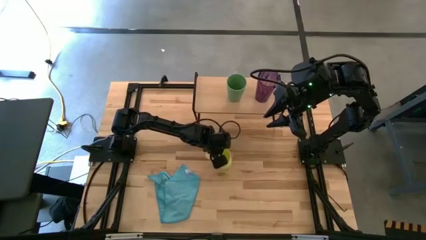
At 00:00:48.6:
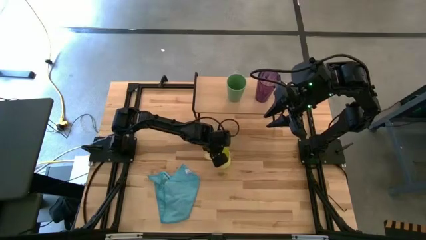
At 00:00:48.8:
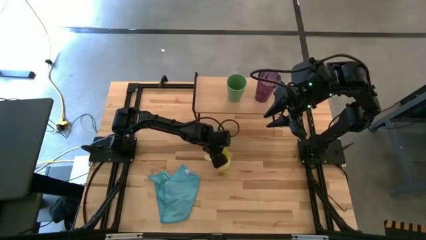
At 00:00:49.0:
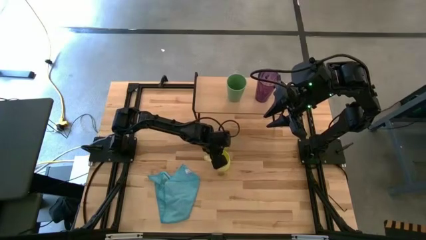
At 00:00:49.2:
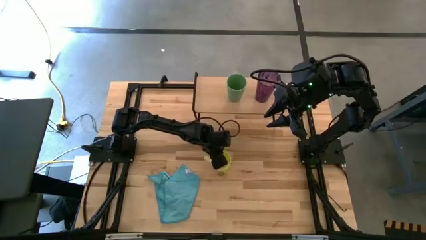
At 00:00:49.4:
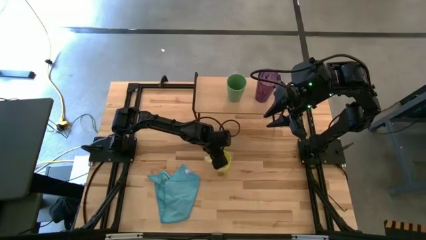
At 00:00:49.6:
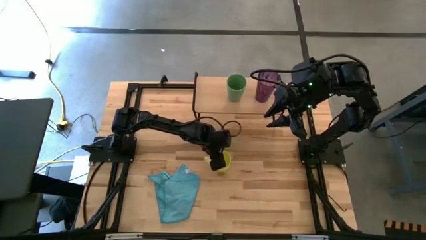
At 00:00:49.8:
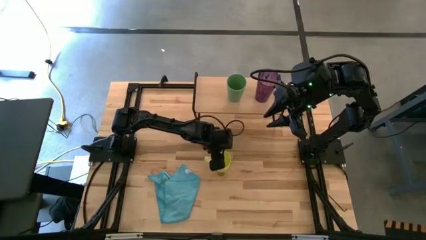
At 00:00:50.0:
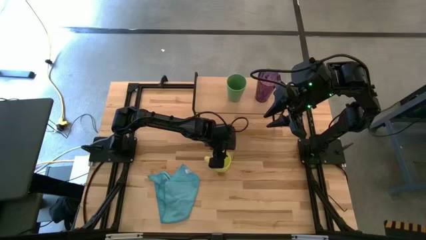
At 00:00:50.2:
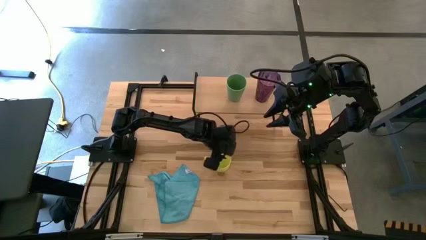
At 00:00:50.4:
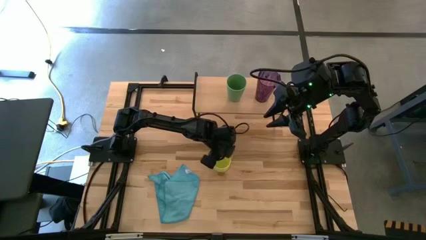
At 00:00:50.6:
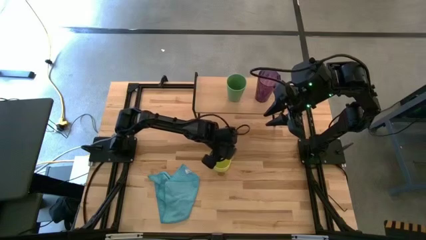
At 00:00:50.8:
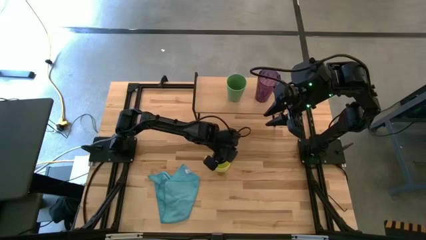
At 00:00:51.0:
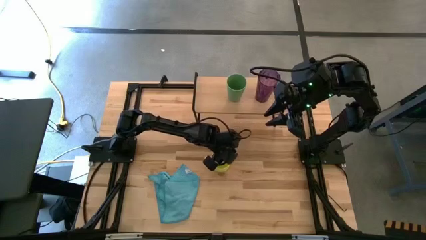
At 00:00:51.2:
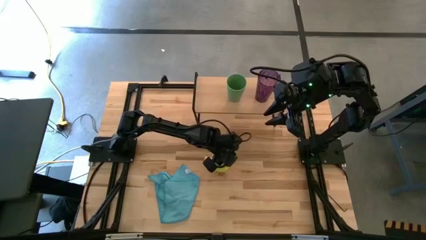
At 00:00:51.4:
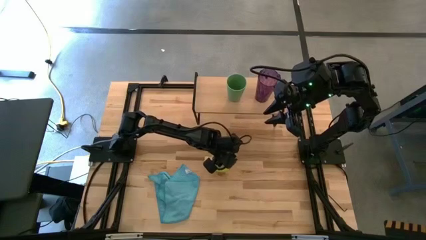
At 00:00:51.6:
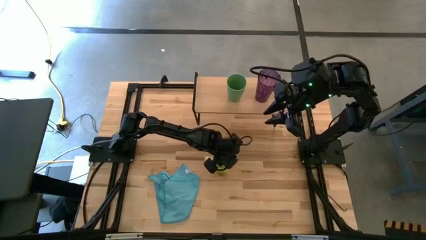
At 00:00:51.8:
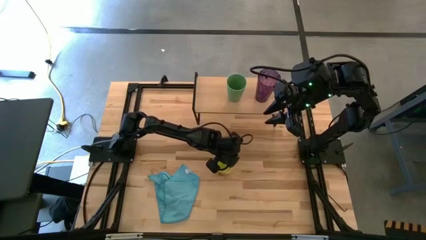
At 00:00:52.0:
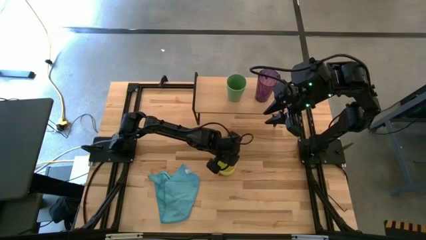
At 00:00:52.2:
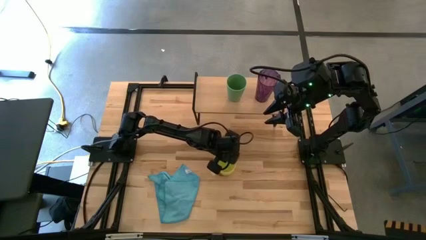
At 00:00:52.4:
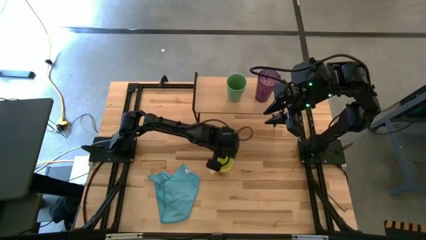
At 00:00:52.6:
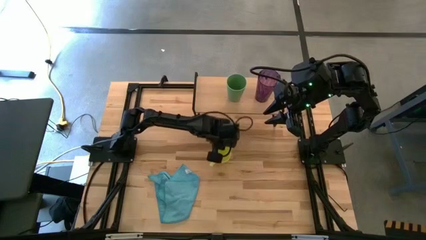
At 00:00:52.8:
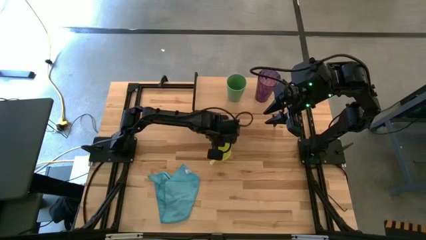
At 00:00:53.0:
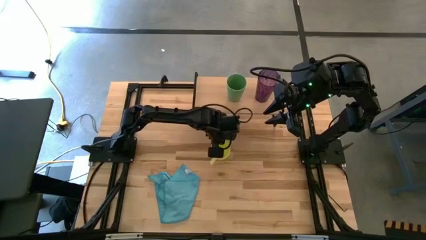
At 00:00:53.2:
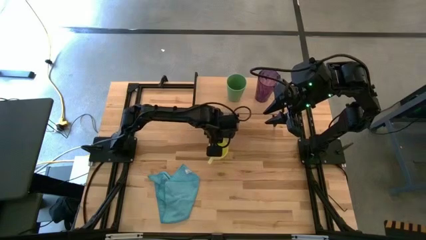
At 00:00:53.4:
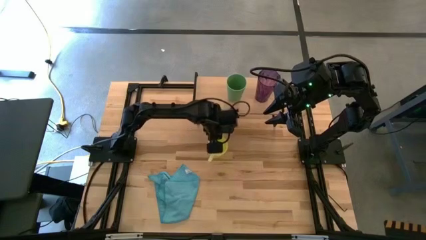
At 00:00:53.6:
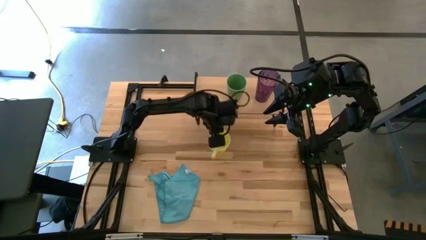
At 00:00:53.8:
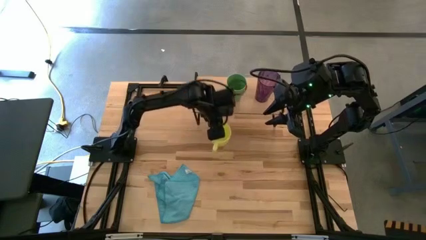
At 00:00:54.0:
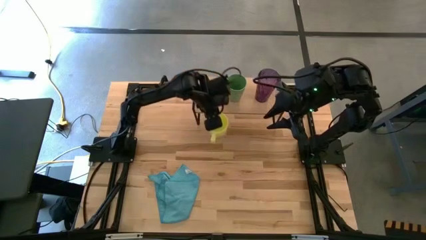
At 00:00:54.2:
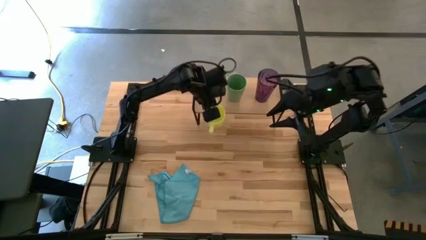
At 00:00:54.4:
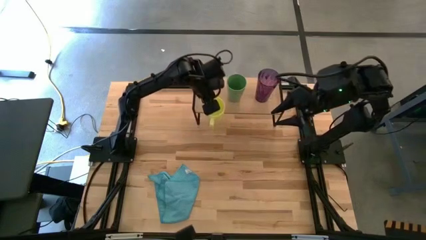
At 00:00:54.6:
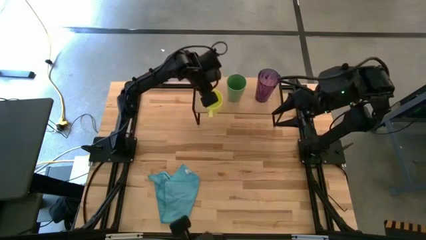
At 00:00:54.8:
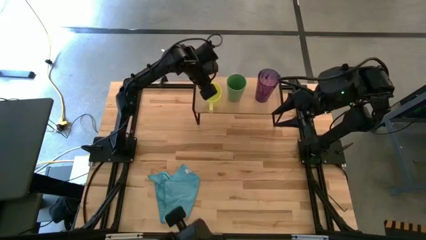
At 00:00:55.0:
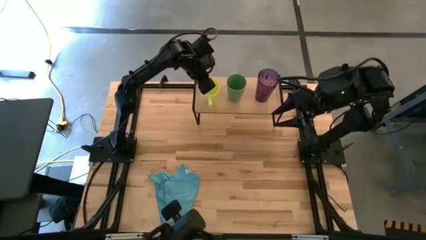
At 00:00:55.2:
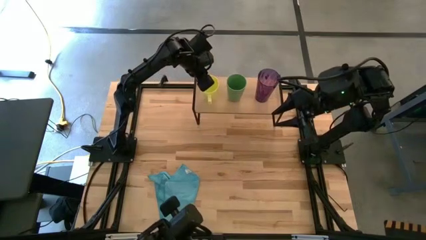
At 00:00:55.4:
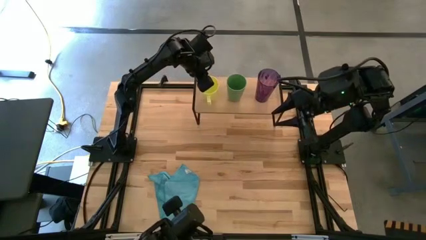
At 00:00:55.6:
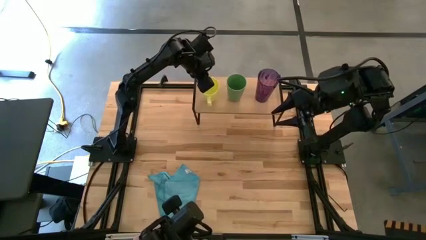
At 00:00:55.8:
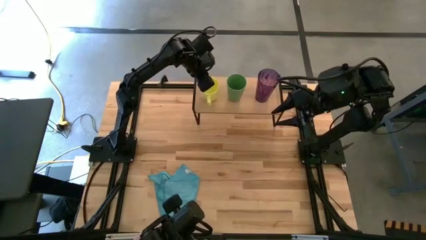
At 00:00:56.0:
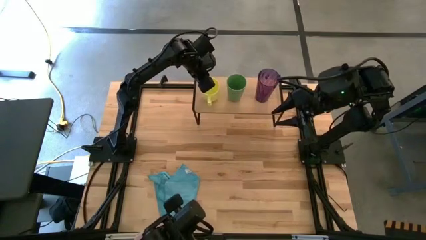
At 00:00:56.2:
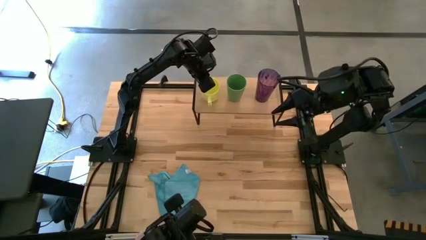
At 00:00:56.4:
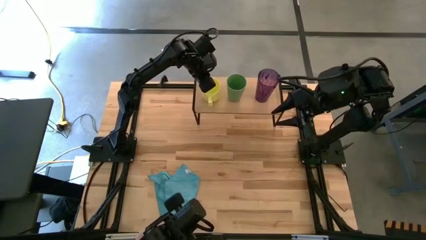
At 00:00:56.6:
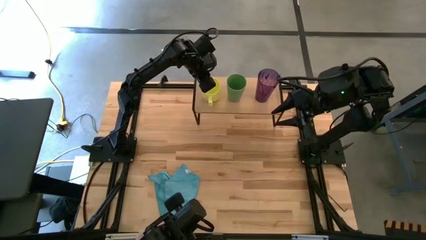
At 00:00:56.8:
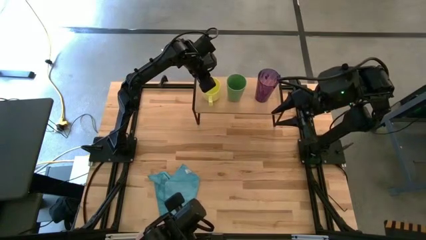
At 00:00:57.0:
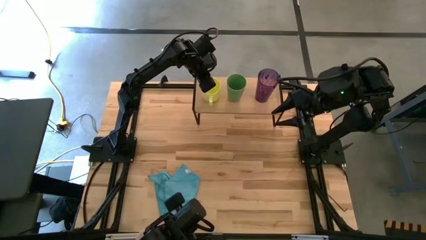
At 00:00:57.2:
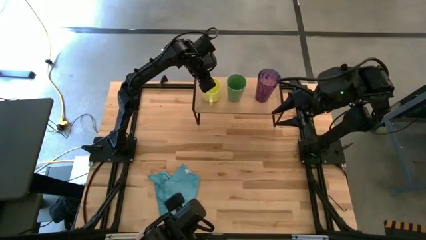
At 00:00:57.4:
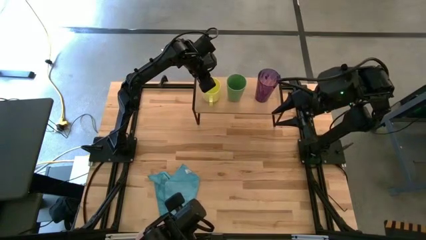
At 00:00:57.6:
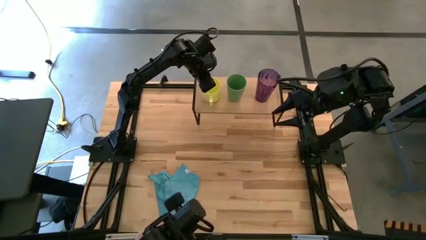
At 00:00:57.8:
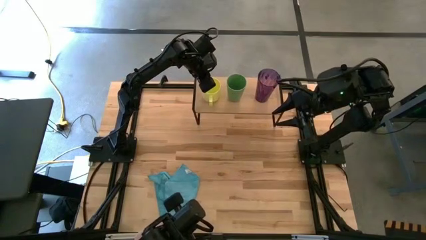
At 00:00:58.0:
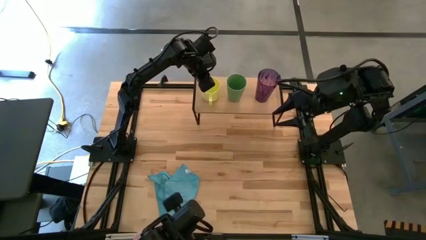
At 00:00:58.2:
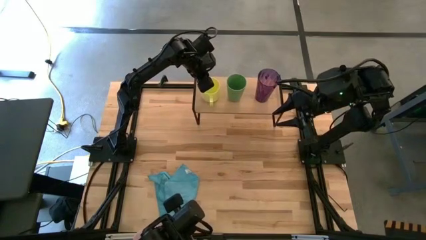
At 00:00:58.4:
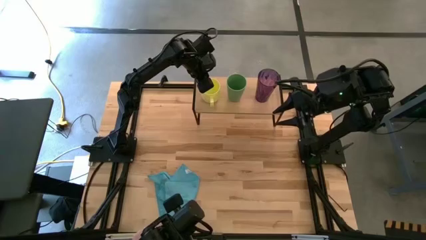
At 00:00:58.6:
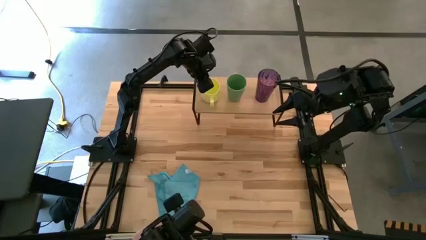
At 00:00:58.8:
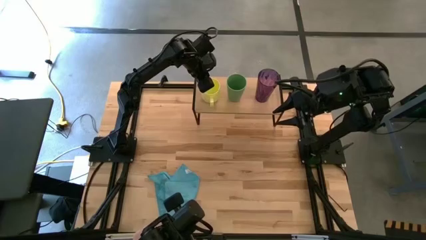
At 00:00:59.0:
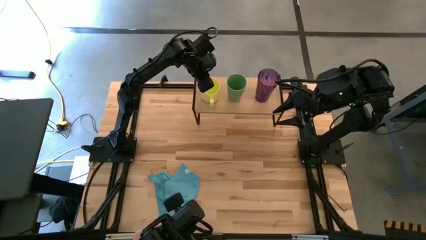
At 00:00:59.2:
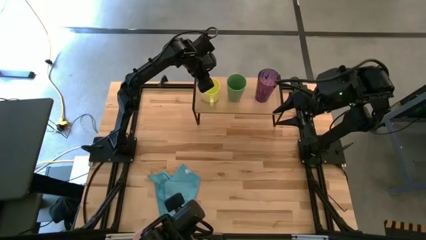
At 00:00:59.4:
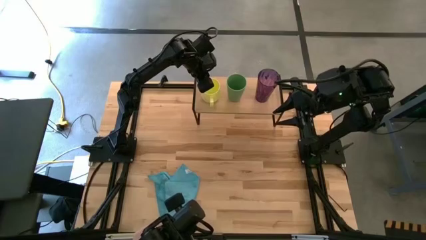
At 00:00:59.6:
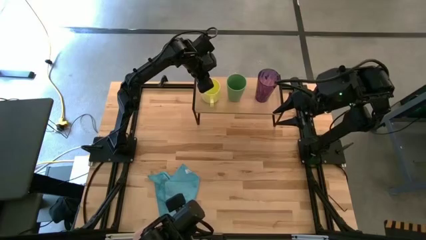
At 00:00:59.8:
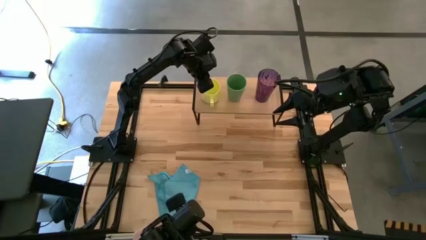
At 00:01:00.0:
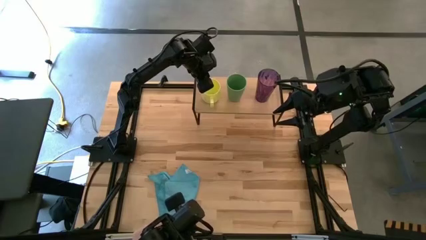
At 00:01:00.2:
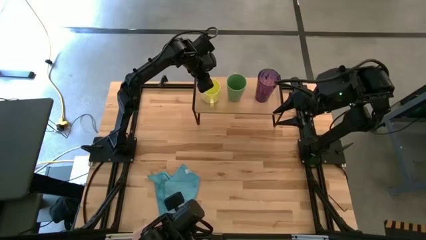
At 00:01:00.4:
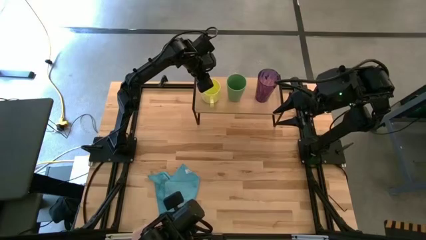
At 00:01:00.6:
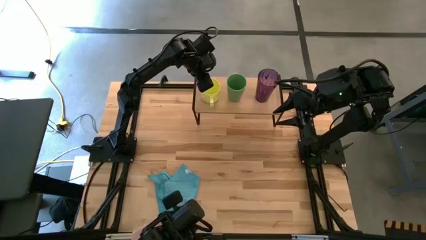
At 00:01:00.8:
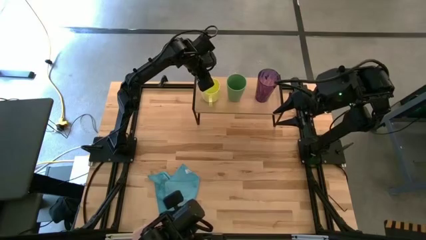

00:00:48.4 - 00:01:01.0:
Task: Stack small to large cups/mugs on shelf
Put the yellow mug on the shelf
